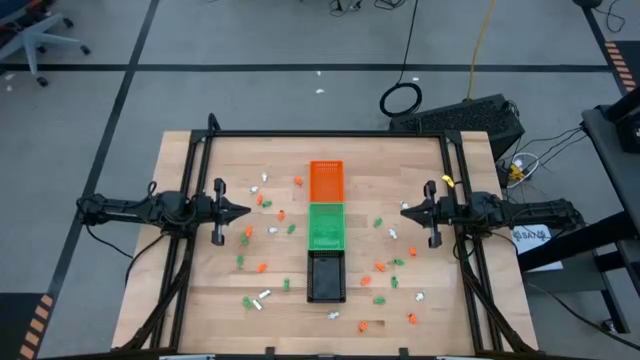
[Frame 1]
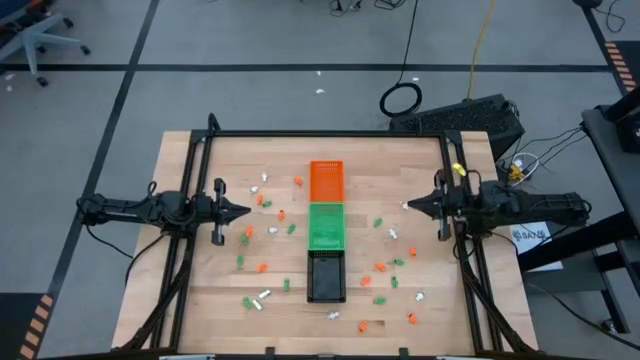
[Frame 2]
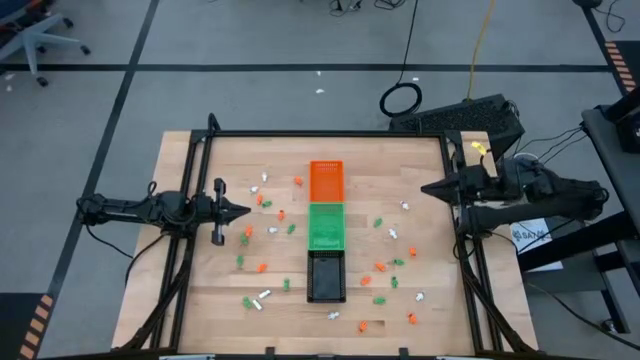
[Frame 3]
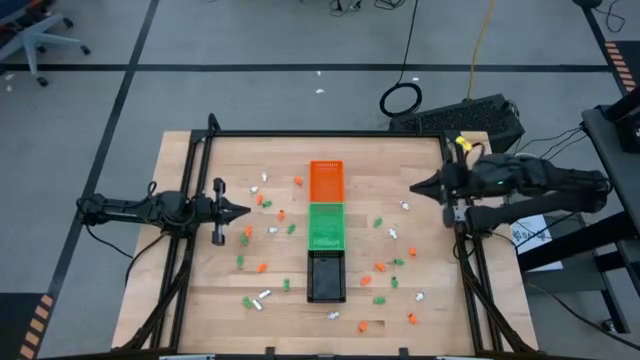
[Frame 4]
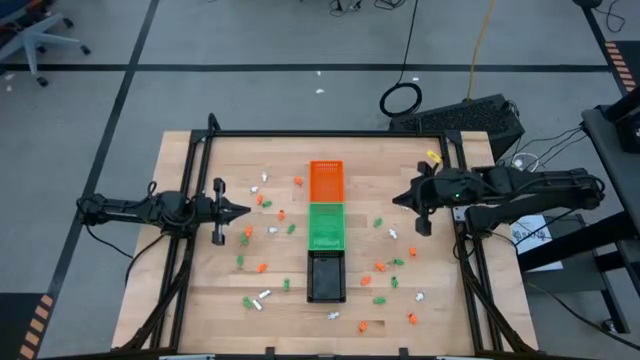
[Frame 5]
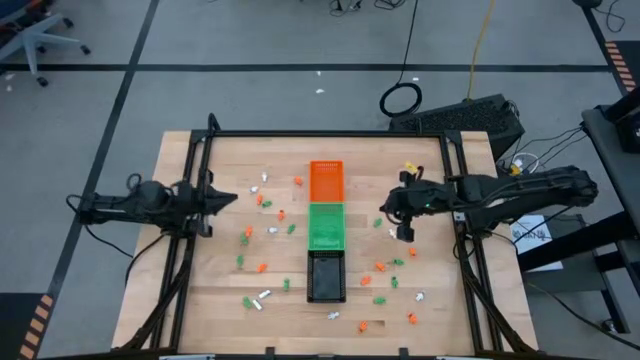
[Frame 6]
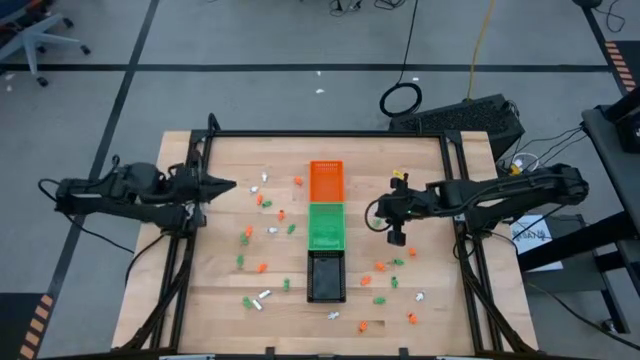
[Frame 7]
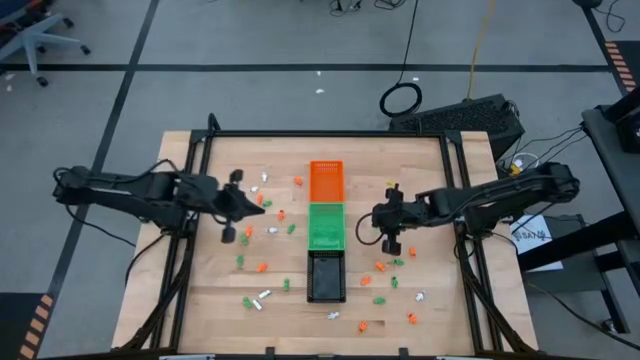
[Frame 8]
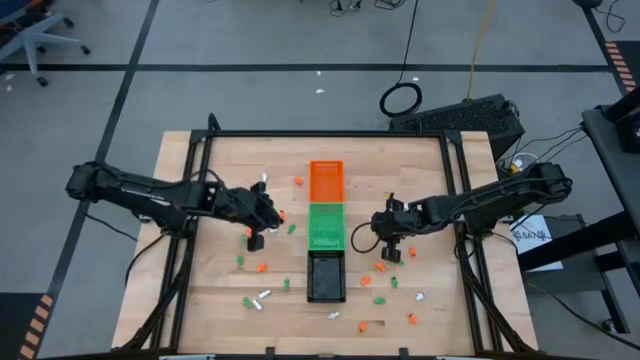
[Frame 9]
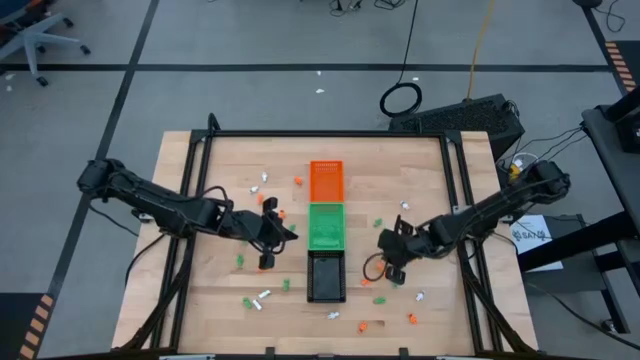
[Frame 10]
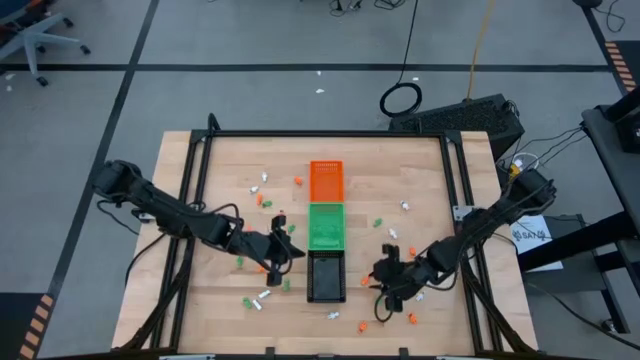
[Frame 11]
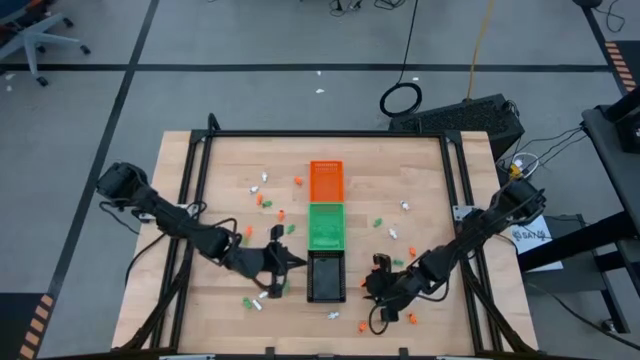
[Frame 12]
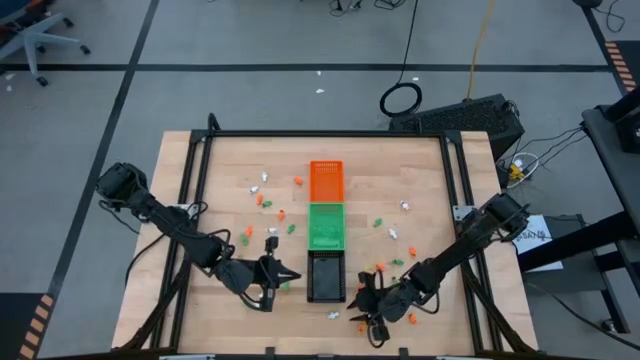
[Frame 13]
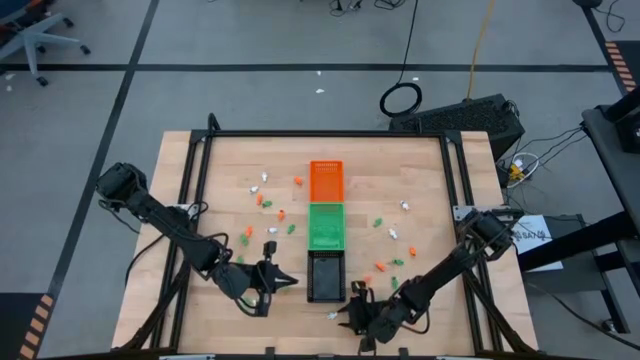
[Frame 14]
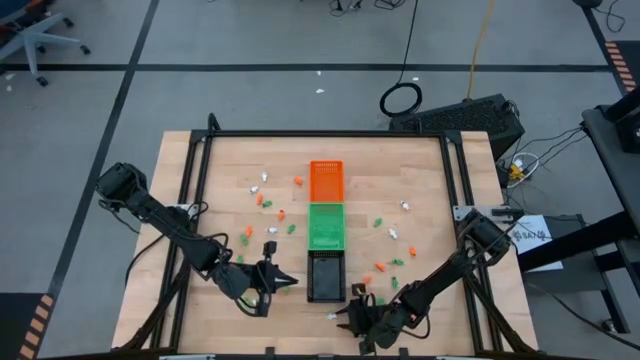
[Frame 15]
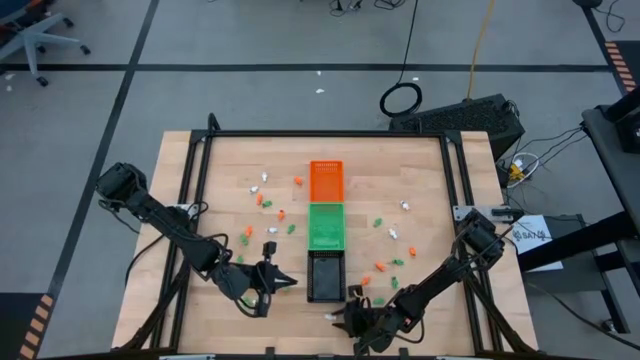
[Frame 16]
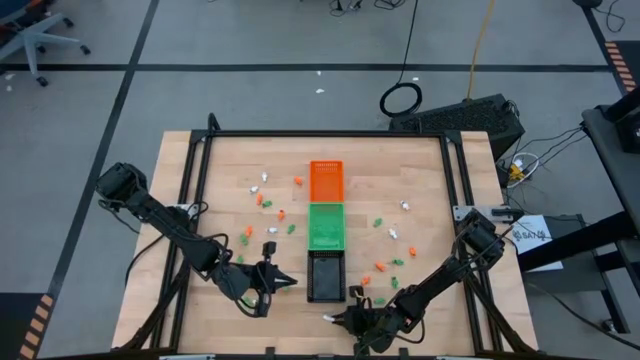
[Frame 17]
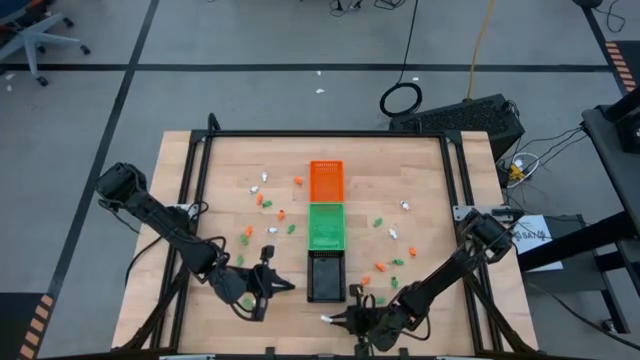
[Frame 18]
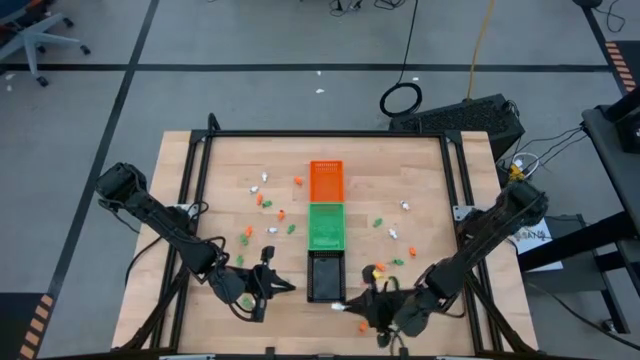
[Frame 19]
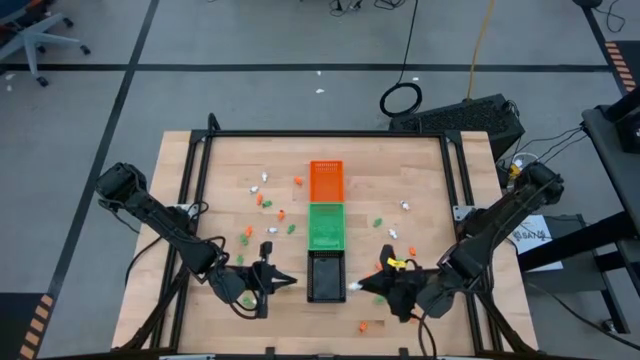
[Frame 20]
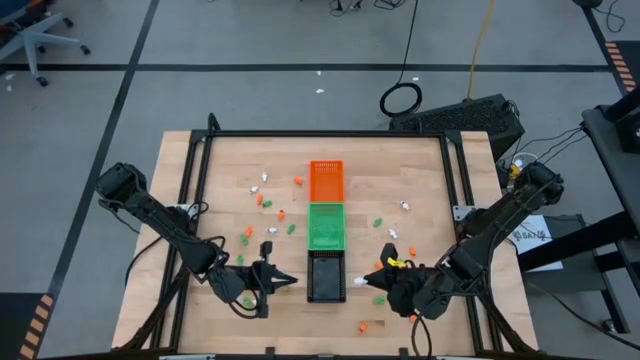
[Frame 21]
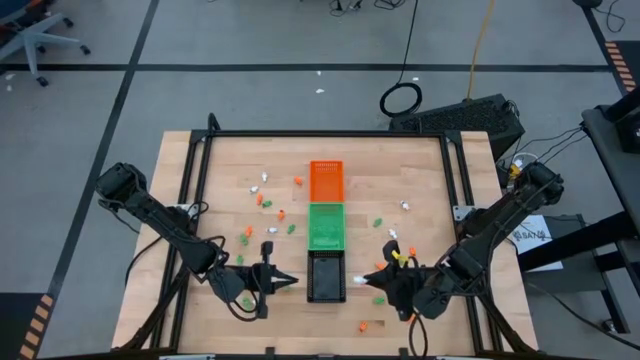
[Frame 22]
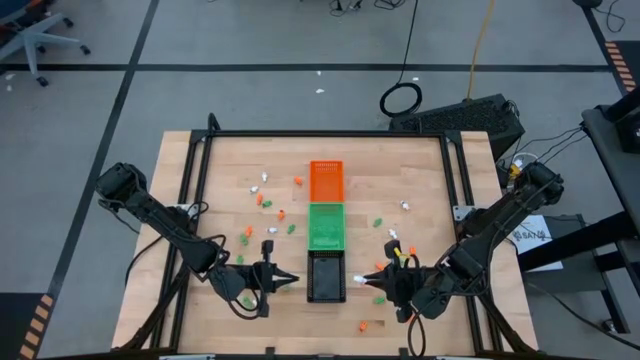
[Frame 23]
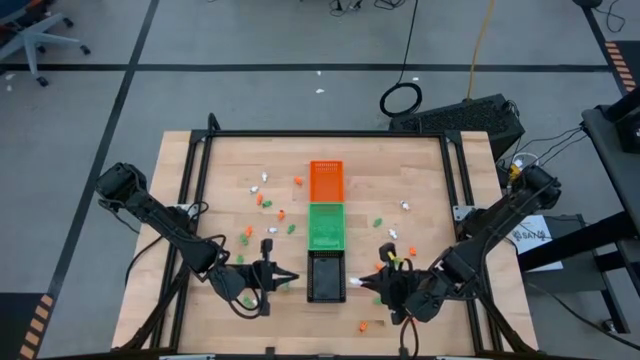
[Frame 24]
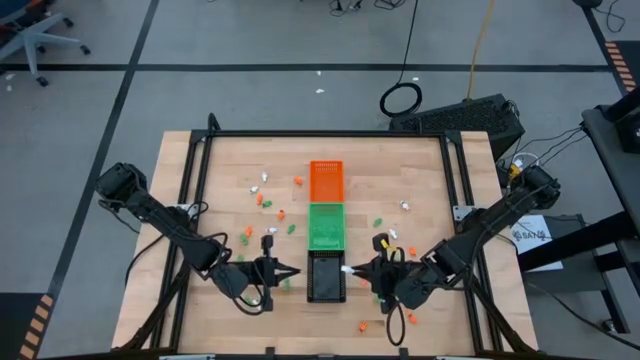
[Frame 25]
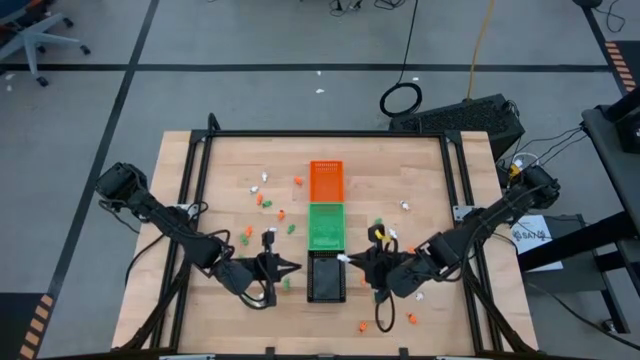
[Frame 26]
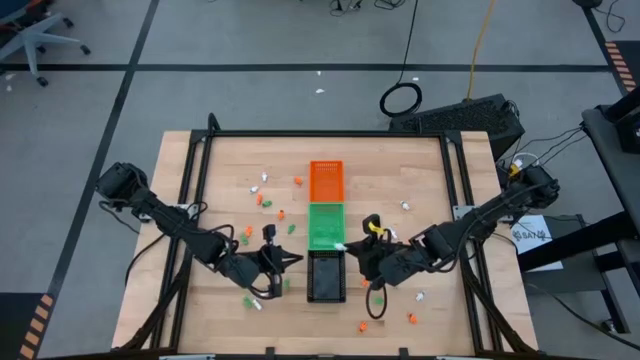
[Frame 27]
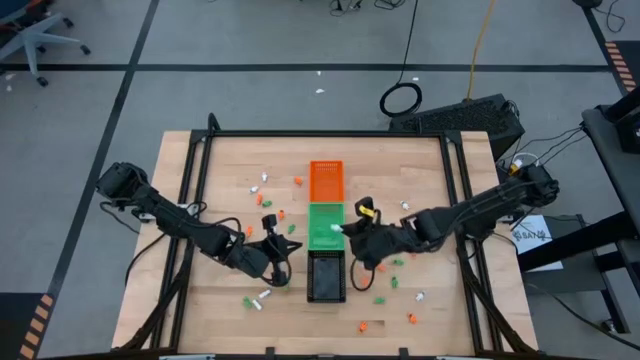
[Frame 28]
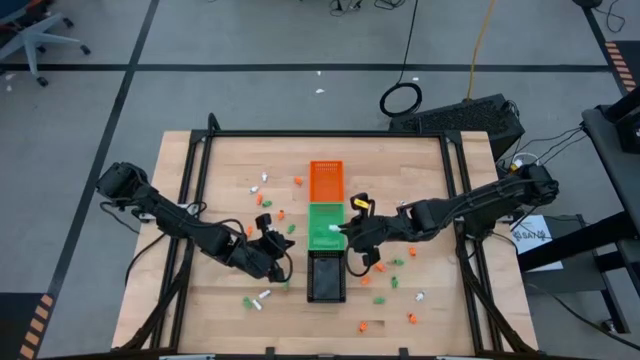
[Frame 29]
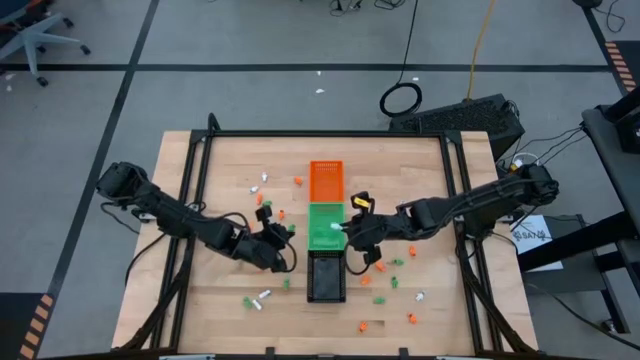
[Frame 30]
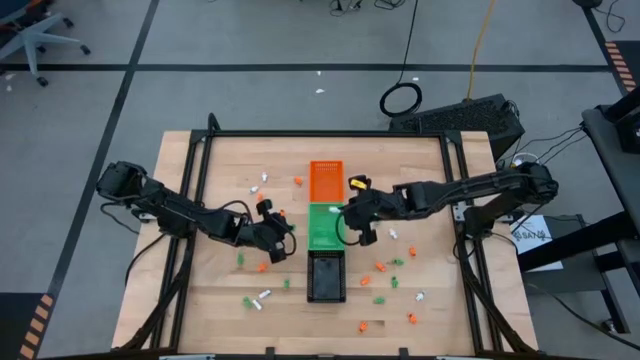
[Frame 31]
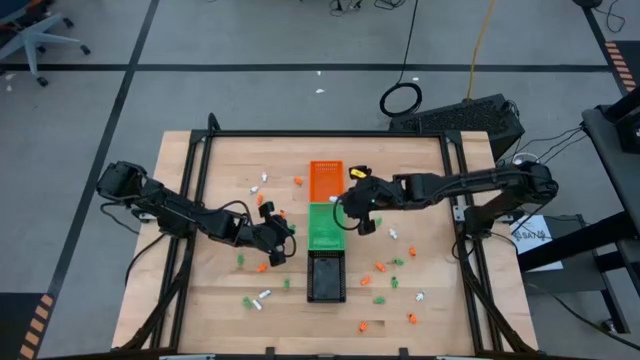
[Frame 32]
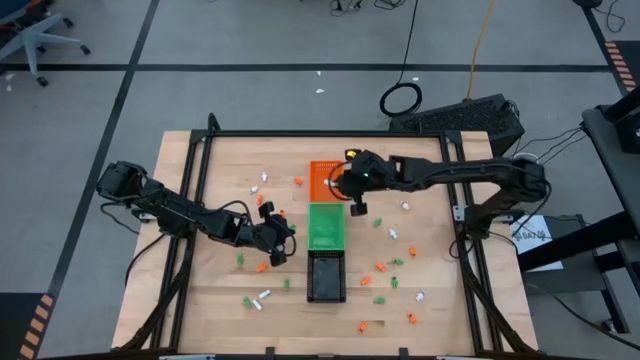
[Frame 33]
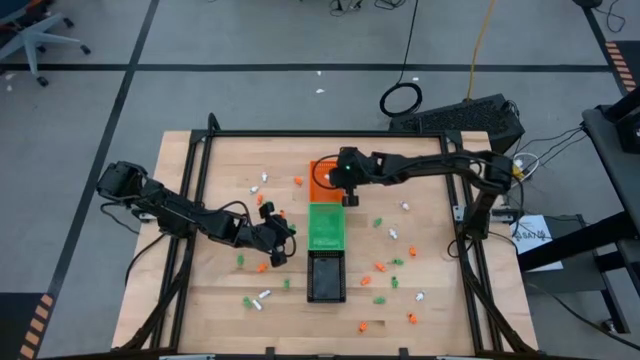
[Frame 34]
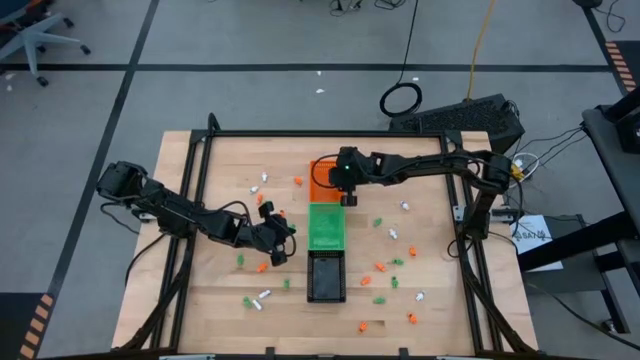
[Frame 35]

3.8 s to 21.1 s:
Task: Sort Halloween decoration
Put the white skeleton toy into the orange bin

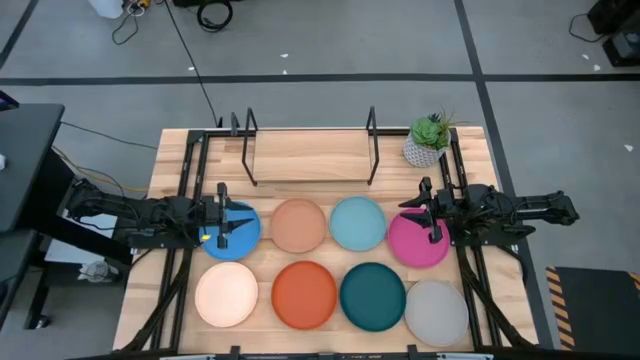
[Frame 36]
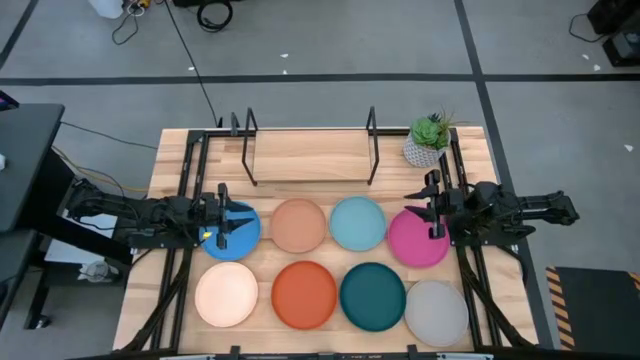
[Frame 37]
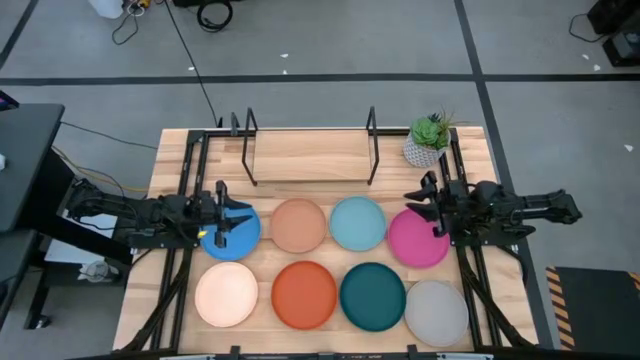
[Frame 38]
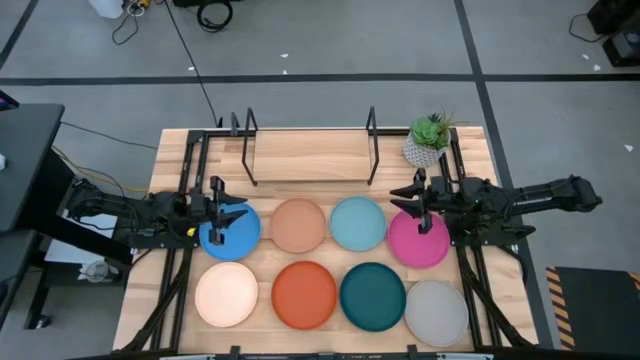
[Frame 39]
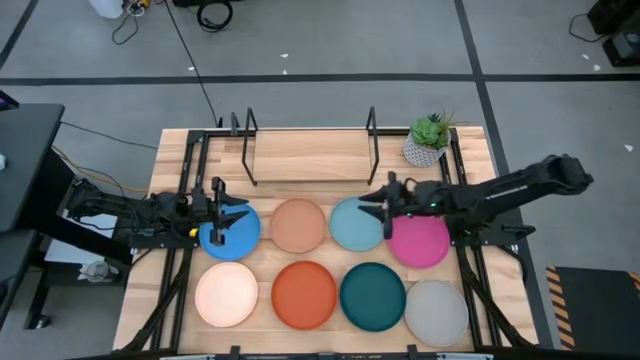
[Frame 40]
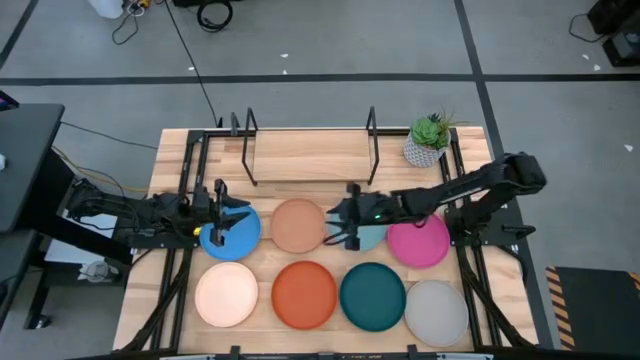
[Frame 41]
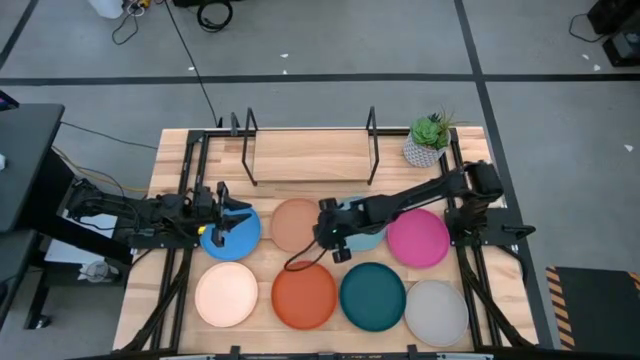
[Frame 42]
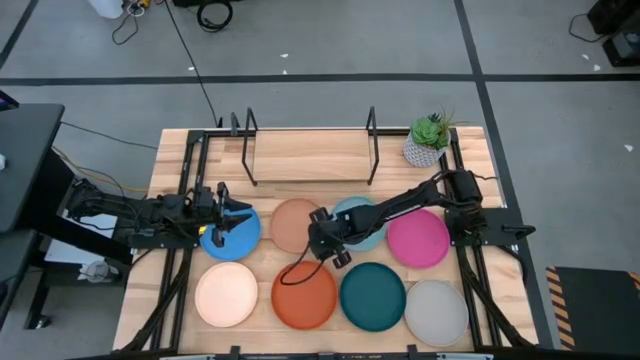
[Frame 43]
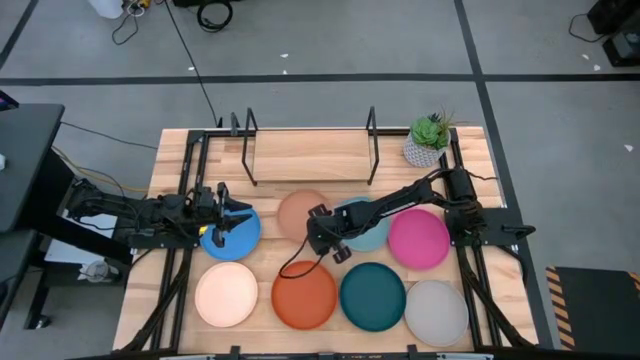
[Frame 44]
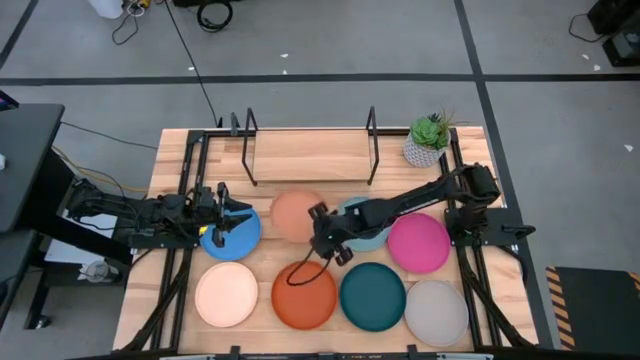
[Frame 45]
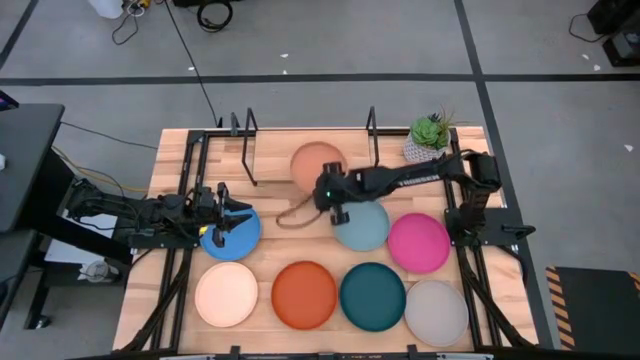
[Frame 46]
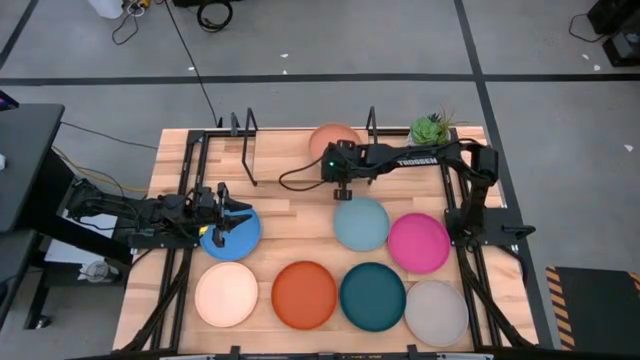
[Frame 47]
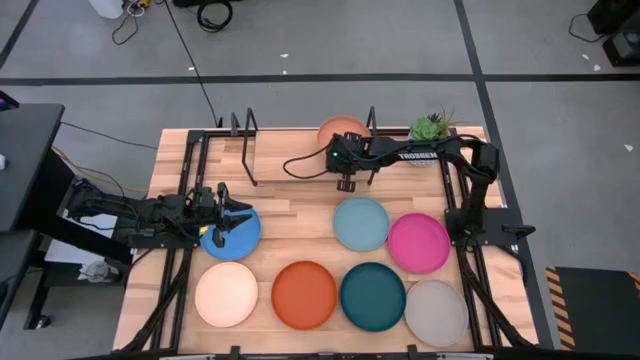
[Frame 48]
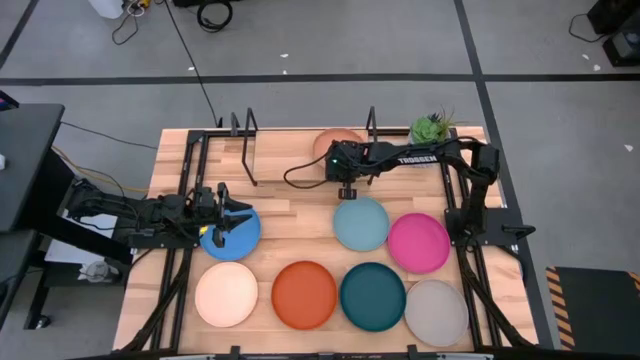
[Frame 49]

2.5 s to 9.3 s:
Task: Place and stack plates onto a shelf
Put the brown plate on the shelf
